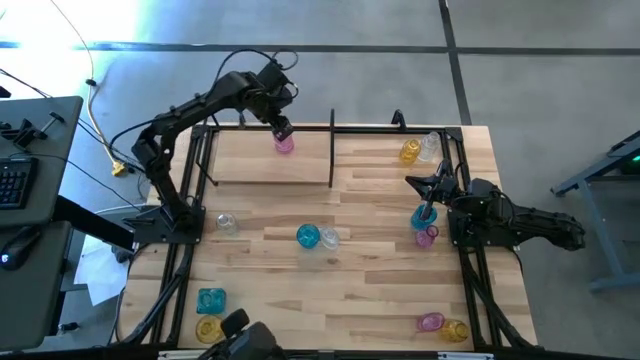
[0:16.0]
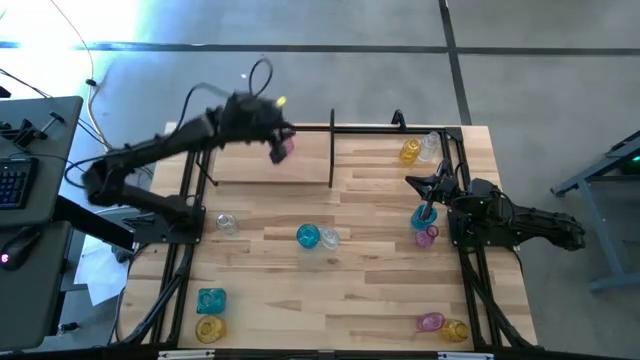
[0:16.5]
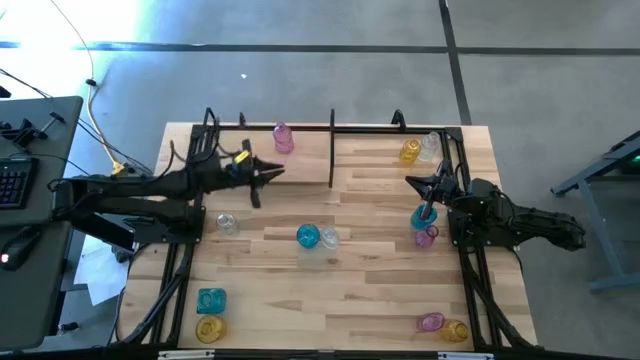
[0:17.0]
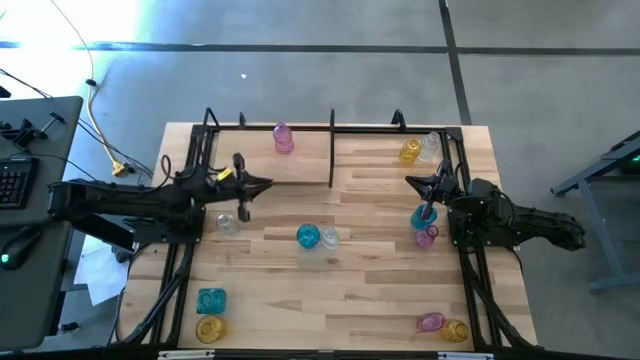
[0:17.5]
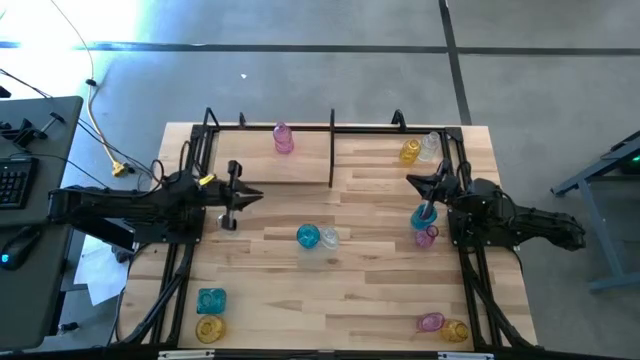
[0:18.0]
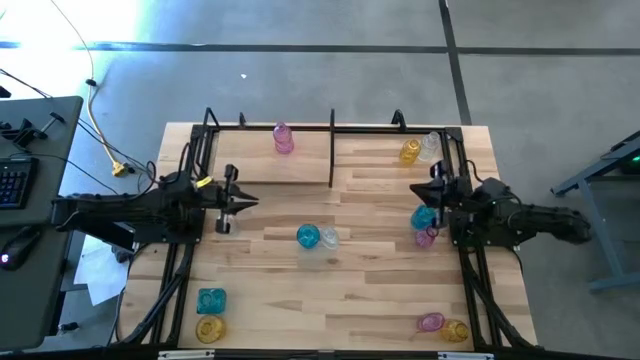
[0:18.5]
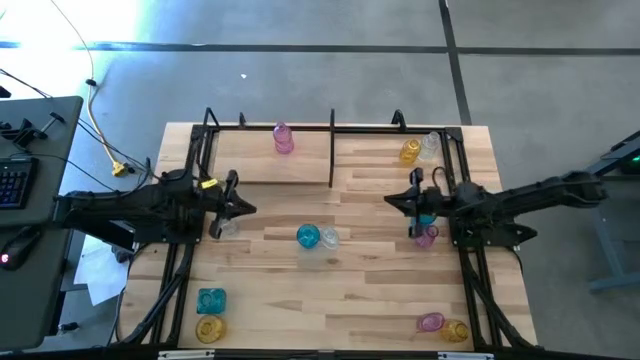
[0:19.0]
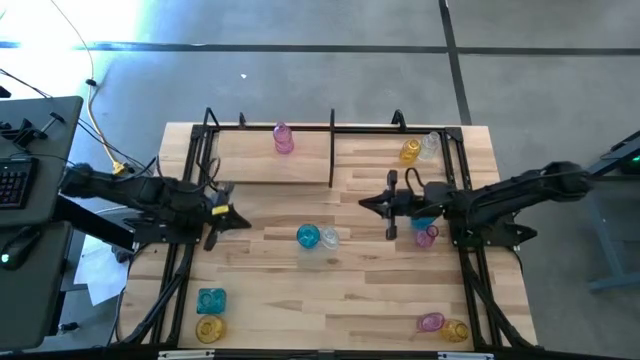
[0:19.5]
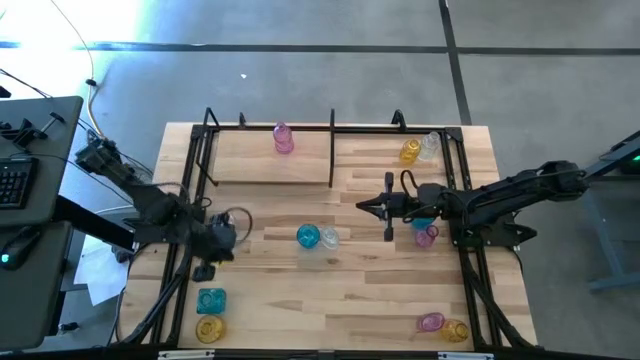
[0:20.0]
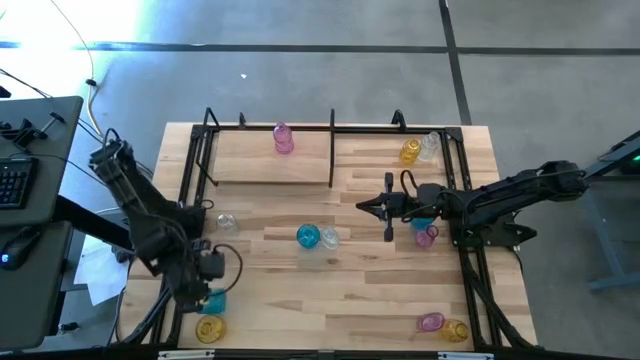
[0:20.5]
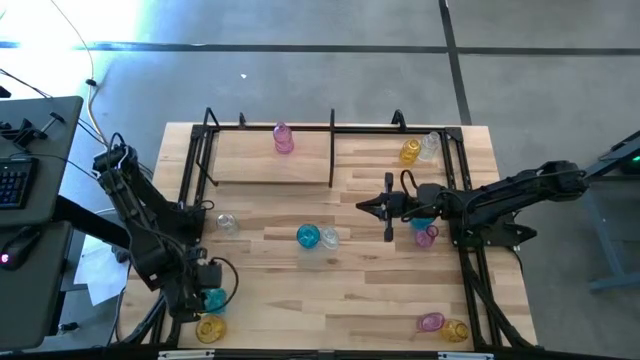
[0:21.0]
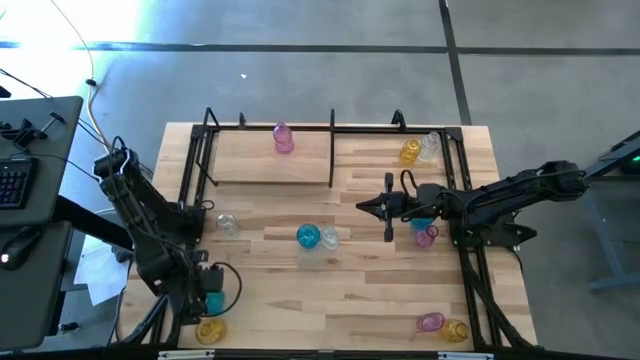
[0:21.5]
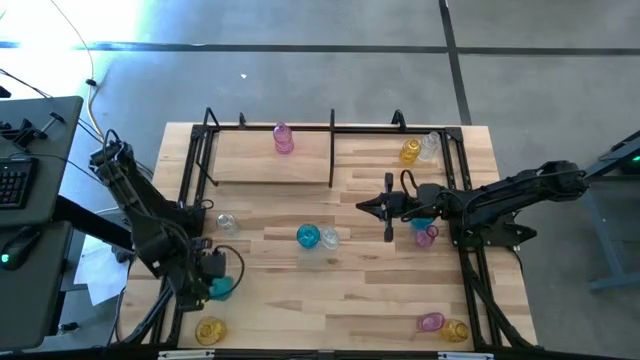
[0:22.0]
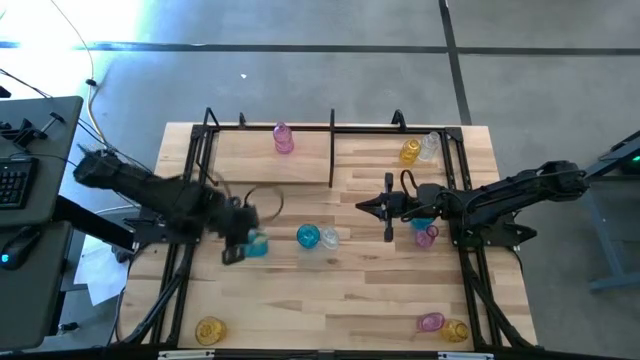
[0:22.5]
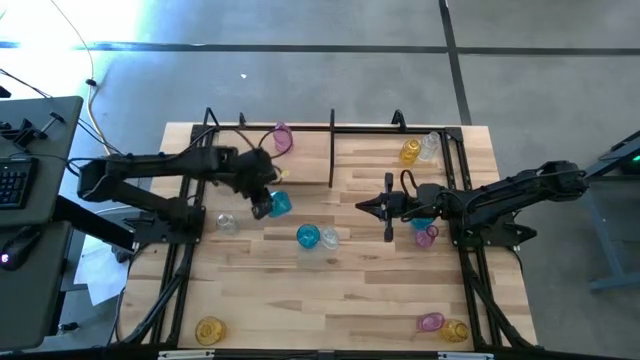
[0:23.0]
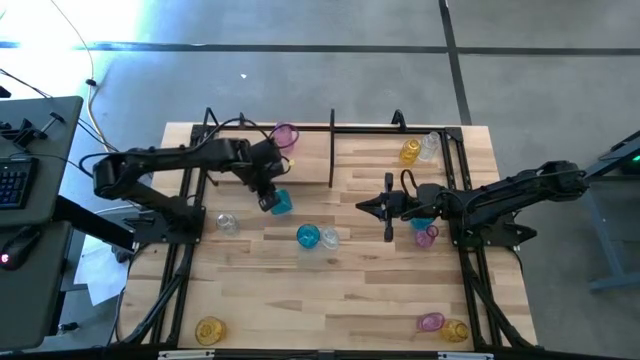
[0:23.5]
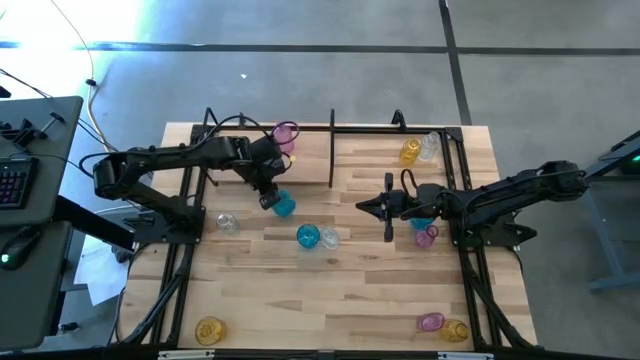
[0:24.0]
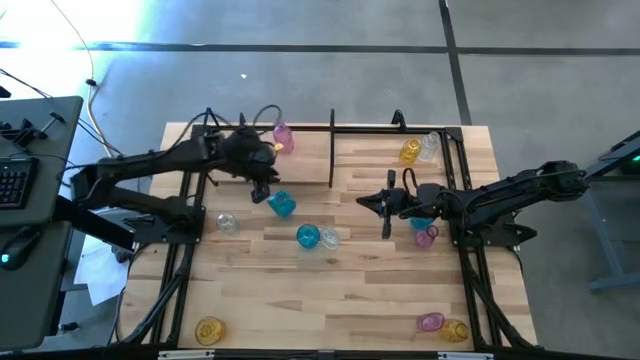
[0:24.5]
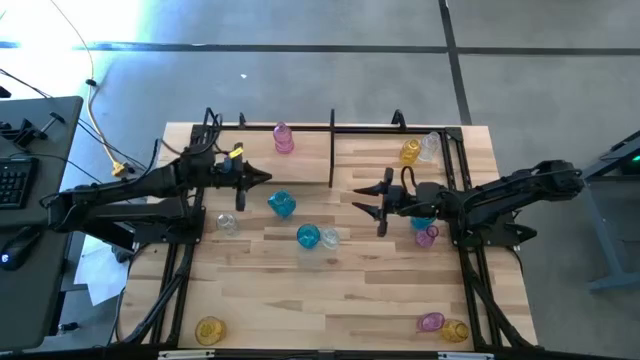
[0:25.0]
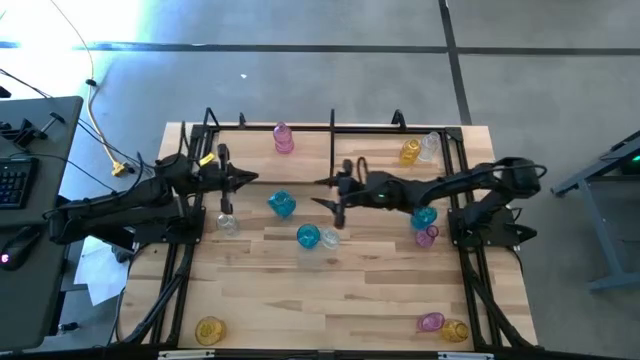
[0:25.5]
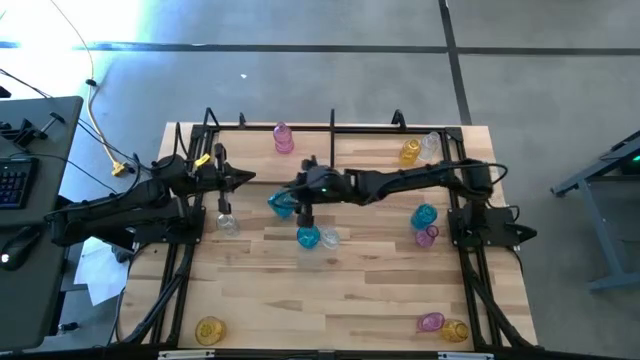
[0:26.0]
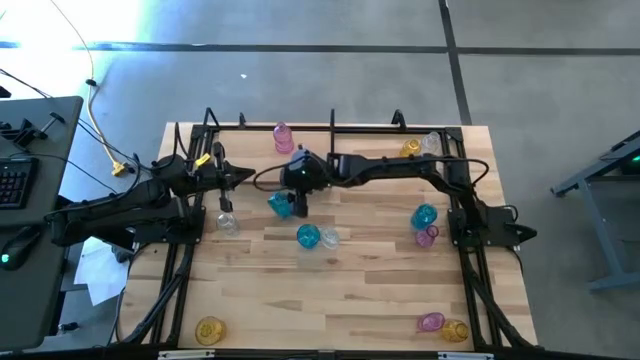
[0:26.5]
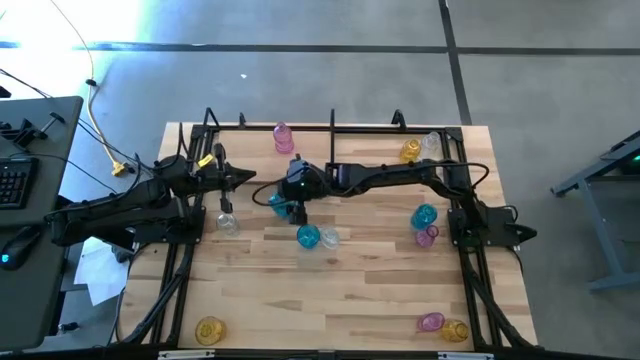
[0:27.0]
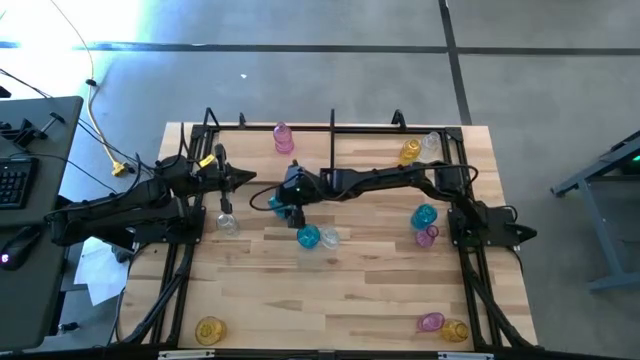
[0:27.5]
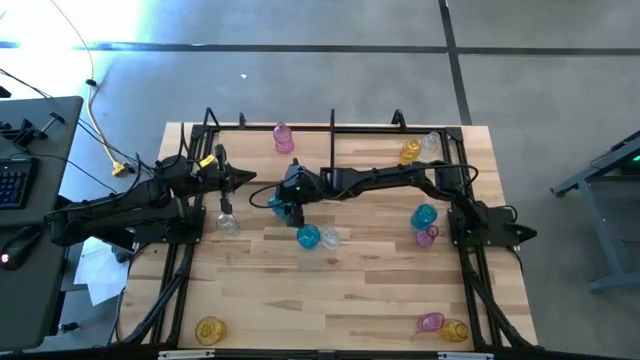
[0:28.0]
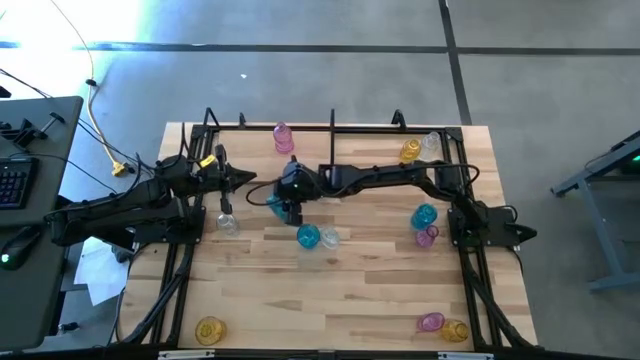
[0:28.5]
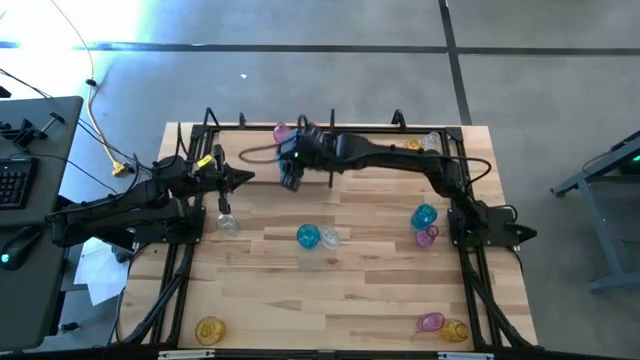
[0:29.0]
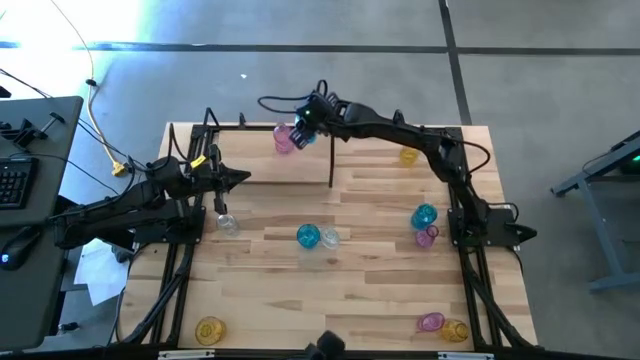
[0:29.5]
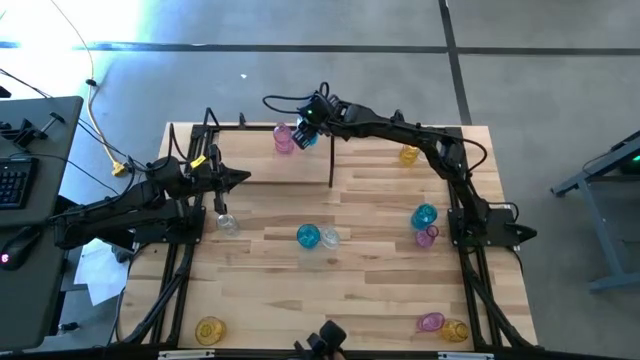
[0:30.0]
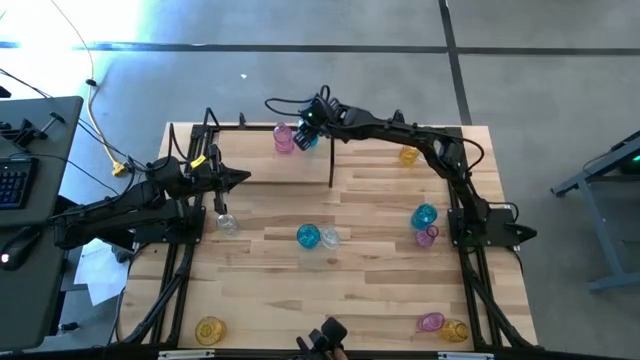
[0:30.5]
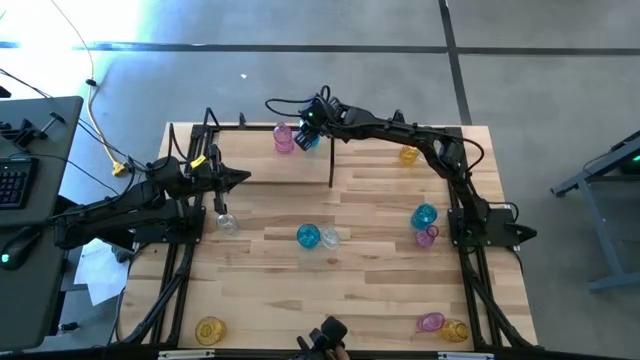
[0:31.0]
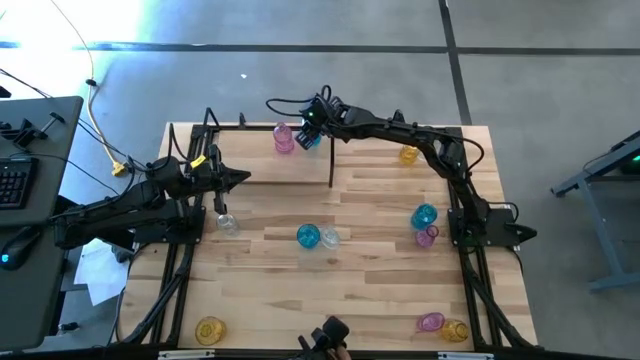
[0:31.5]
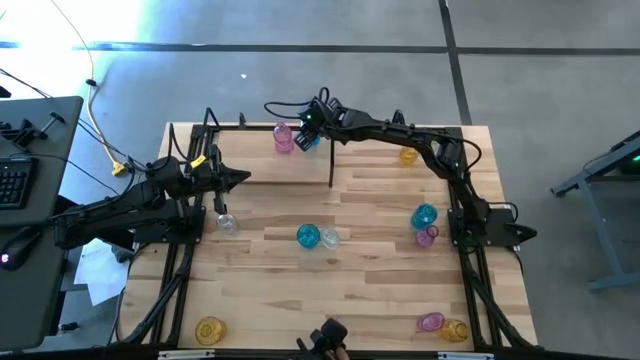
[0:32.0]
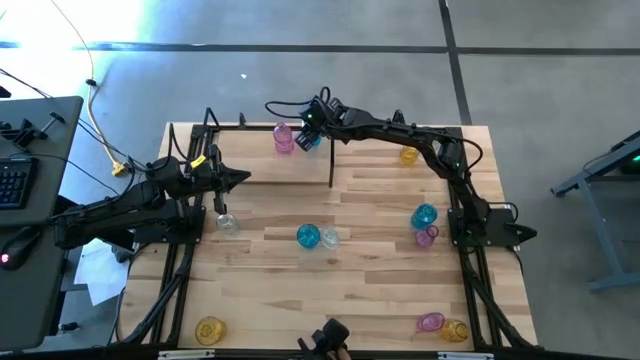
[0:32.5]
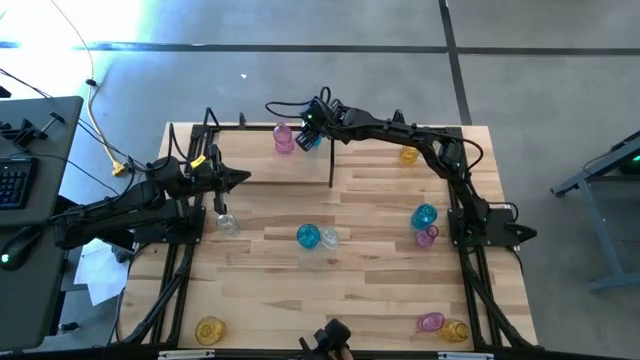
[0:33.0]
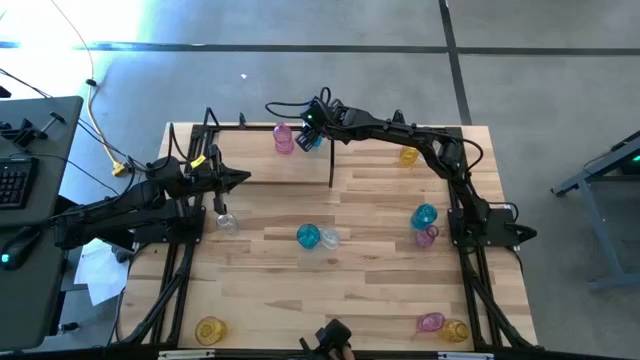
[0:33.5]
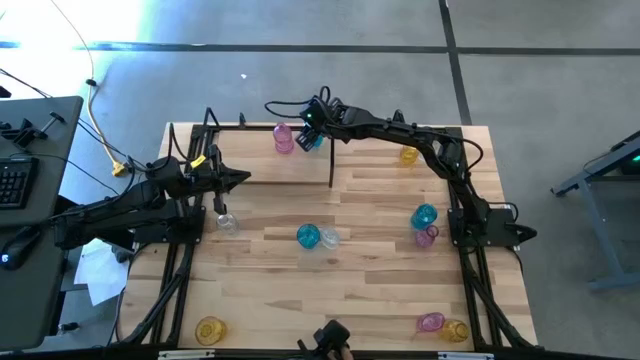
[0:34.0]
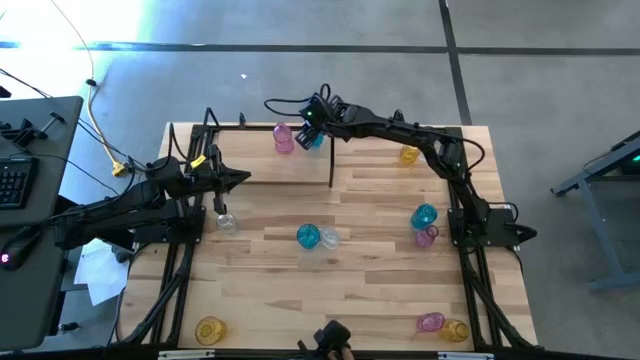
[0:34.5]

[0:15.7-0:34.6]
Task: sort vases onto shelf
Put the bottom left blue flower vase on the shelf

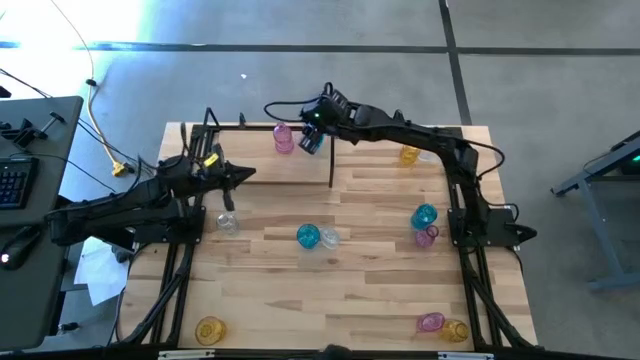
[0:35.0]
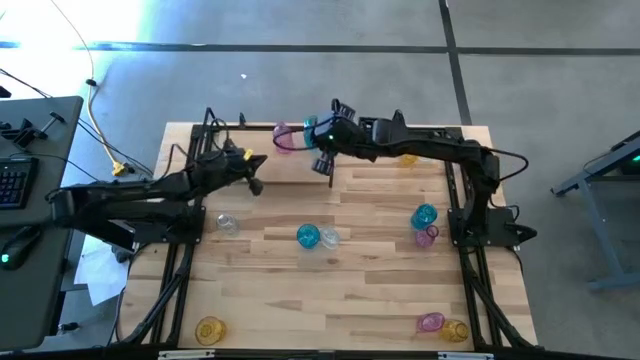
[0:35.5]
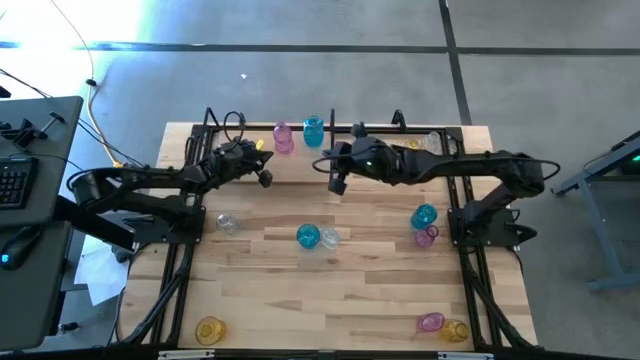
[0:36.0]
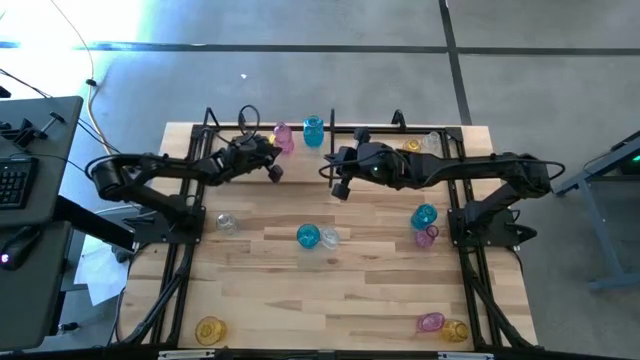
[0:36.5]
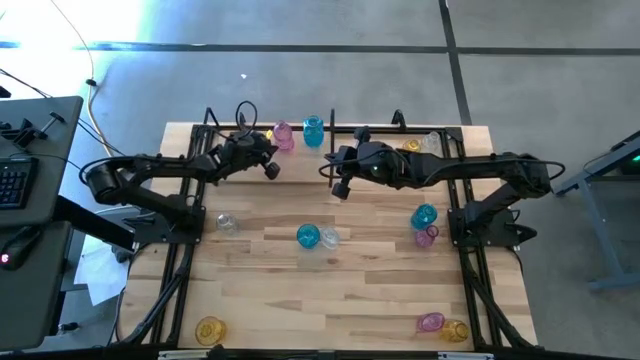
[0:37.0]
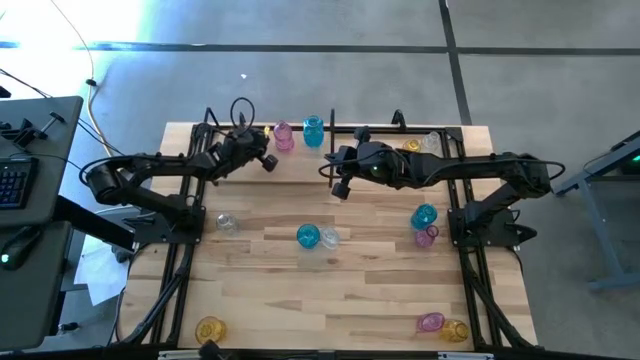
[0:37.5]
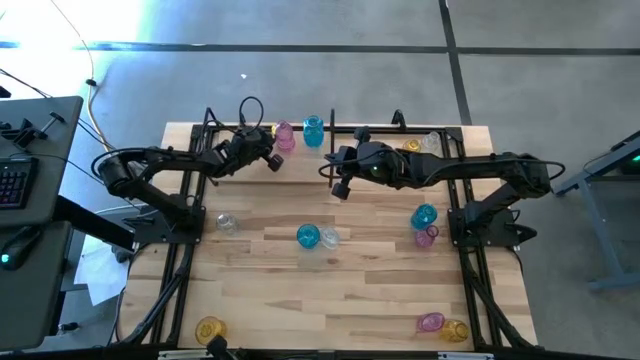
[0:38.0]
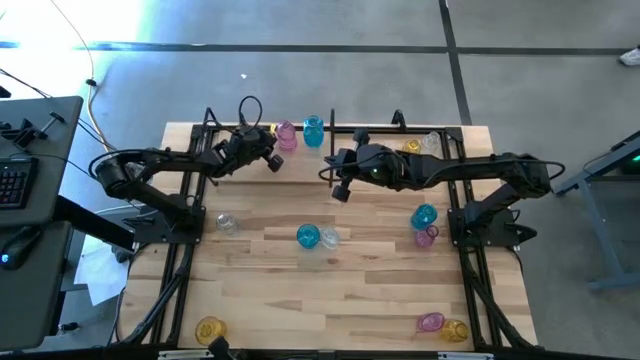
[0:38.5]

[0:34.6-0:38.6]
Adjust the purple flower vase on the shelf
